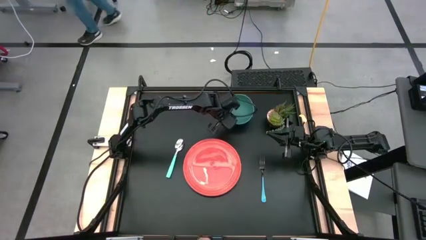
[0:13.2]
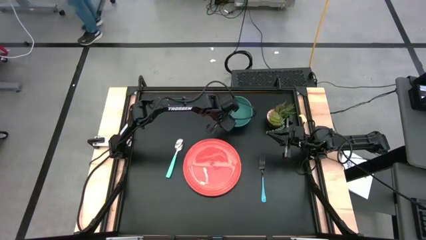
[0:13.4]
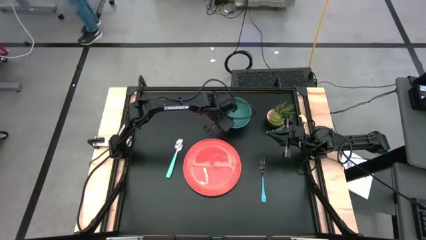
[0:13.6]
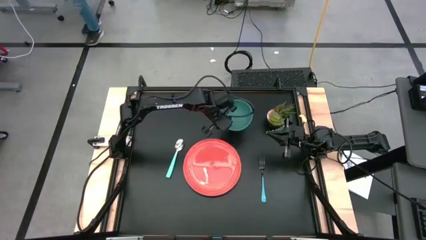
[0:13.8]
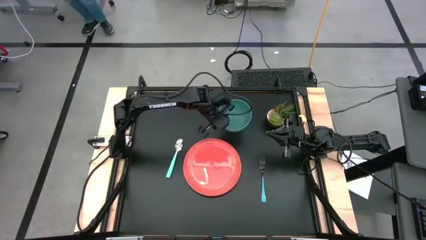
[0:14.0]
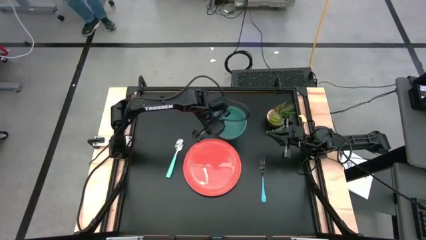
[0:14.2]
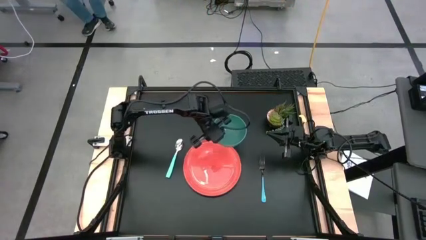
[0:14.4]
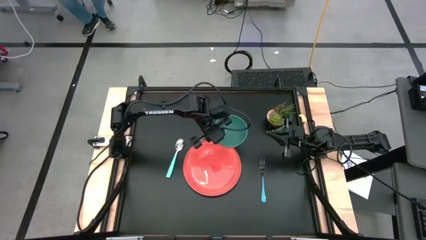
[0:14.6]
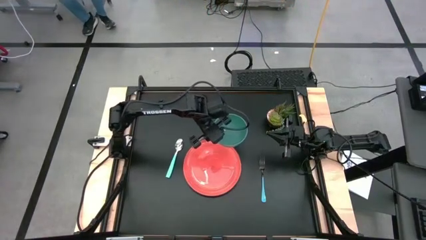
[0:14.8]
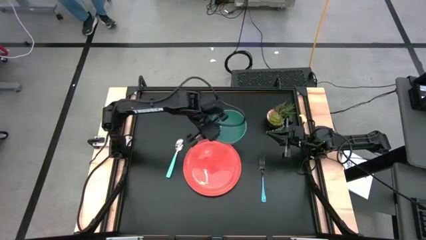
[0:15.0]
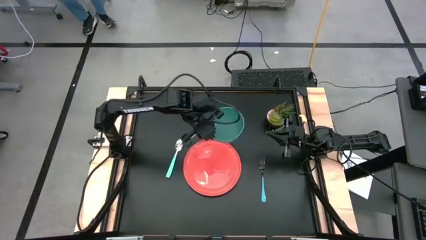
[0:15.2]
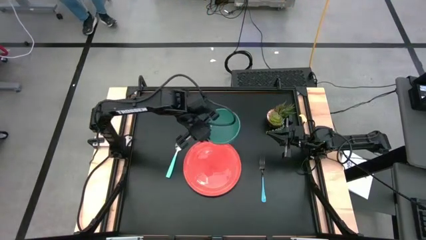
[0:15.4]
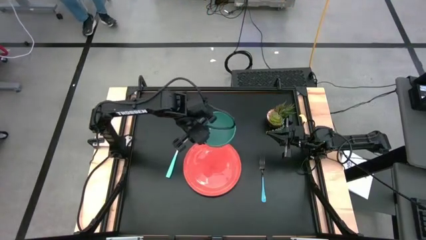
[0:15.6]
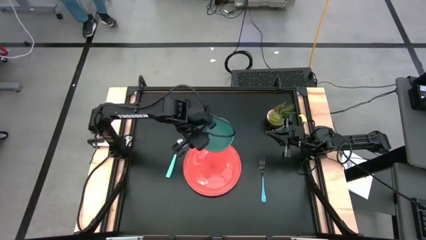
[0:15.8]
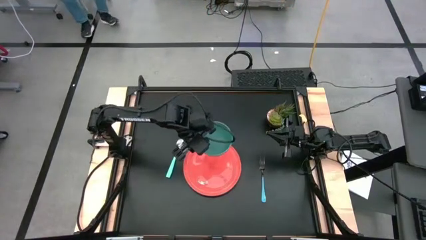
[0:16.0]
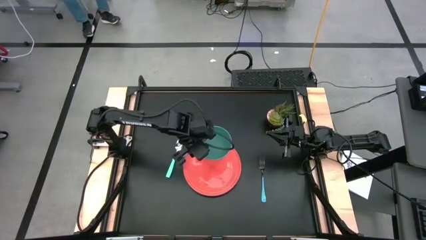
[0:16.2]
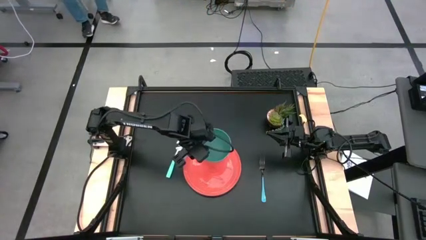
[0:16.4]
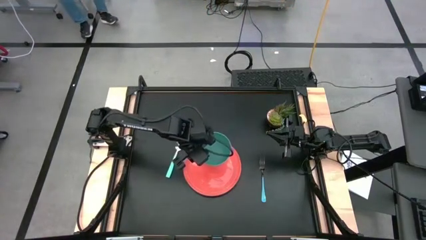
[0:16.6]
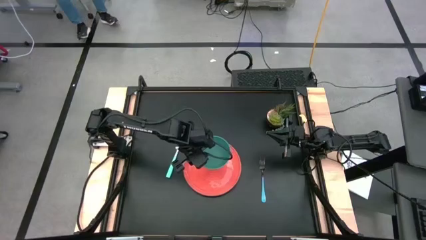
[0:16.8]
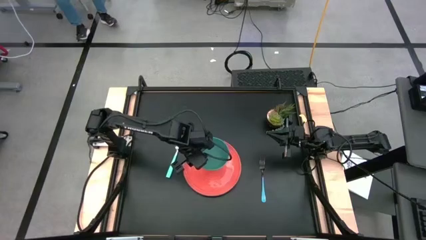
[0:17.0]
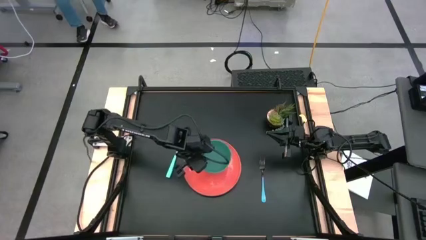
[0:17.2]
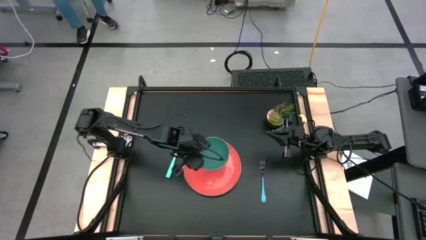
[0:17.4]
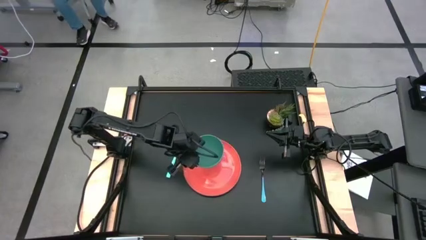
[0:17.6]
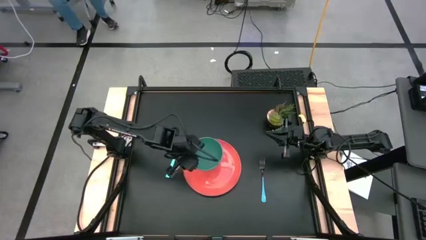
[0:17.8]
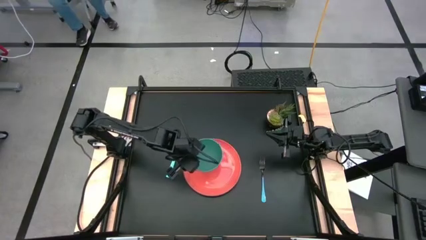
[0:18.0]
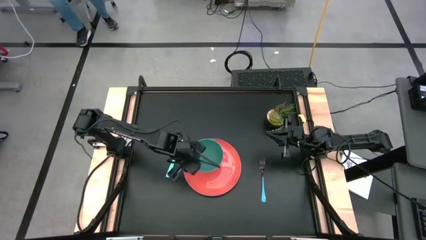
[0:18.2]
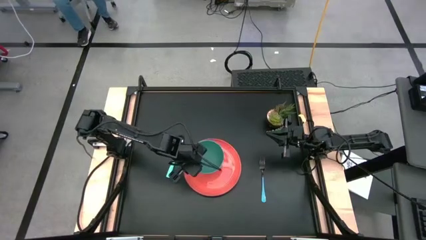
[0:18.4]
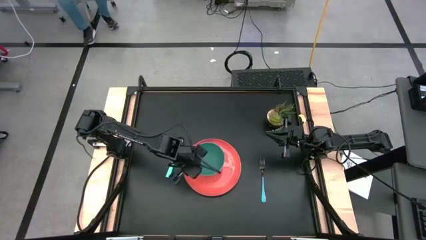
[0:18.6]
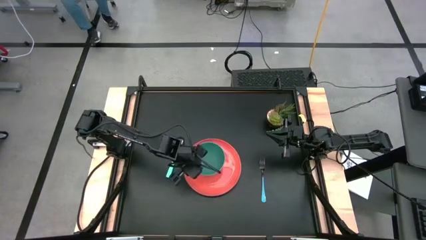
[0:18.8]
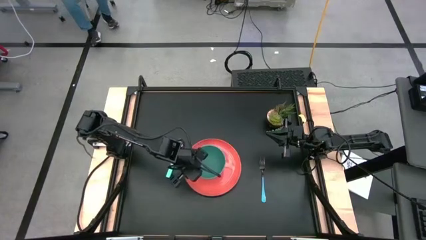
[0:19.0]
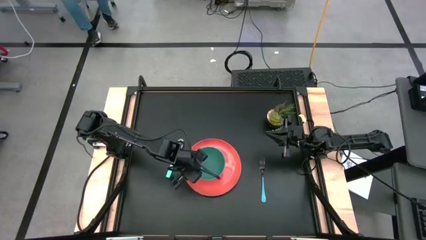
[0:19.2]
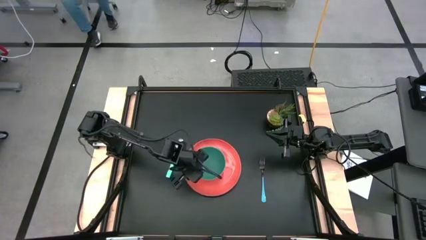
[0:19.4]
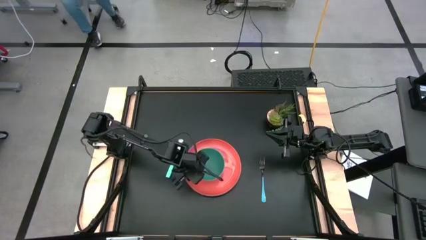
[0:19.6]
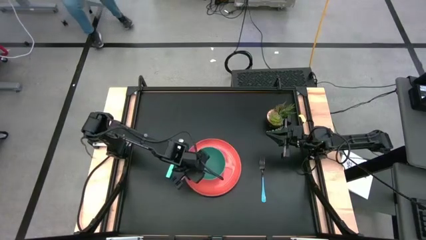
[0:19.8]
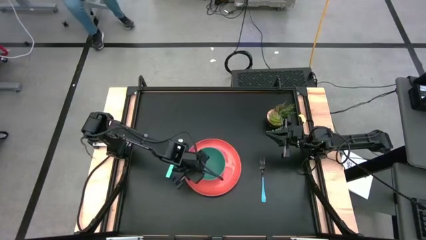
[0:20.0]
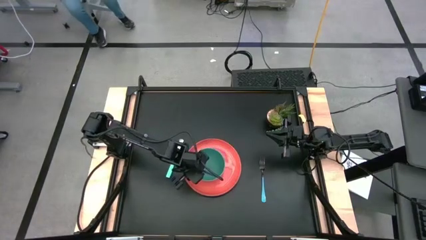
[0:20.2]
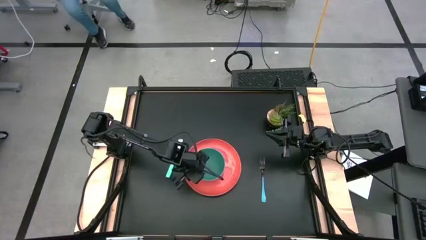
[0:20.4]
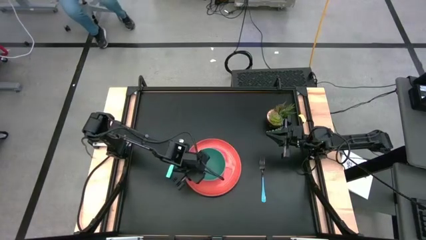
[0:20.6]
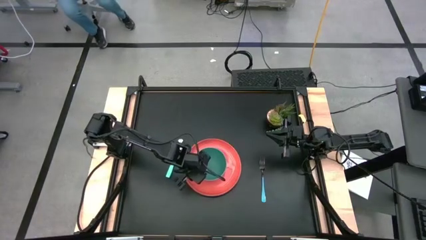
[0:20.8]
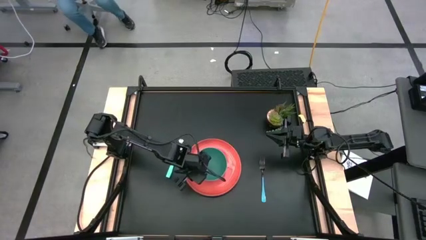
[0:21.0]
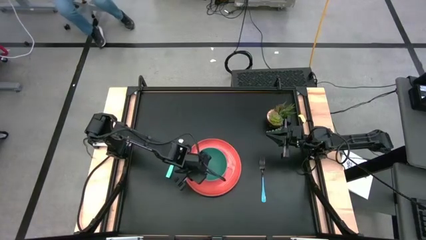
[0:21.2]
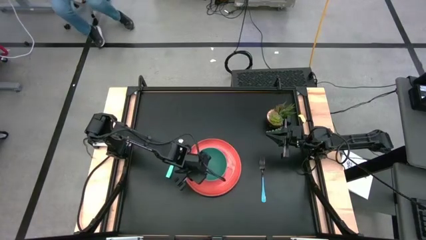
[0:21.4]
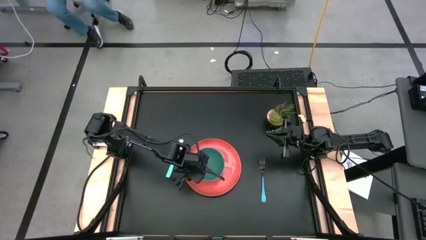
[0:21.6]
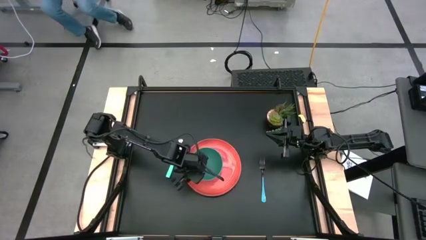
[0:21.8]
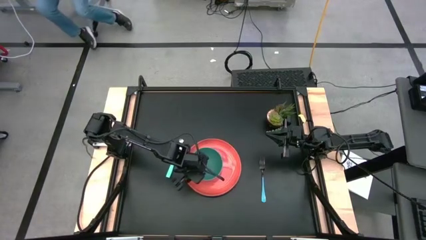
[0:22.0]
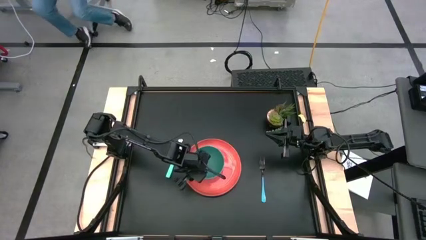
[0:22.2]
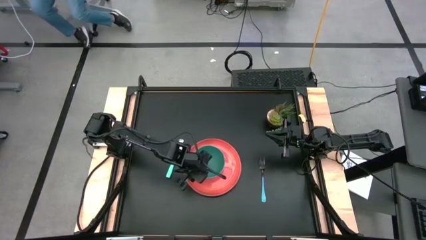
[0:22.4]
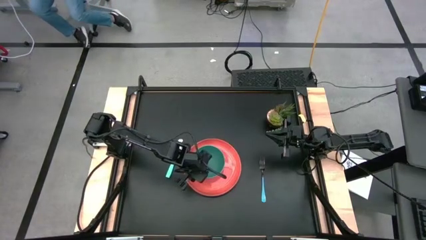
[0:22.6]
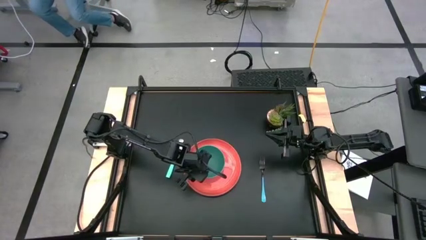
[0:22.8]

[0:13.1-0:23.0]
Task: Set table place
Put the green bowl on top of the orange plate

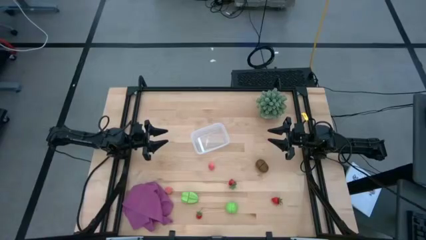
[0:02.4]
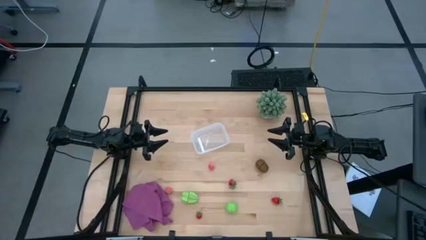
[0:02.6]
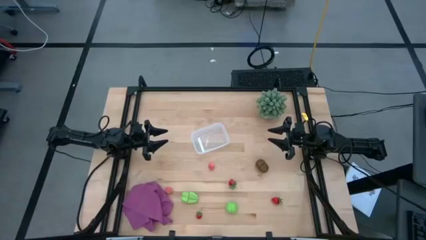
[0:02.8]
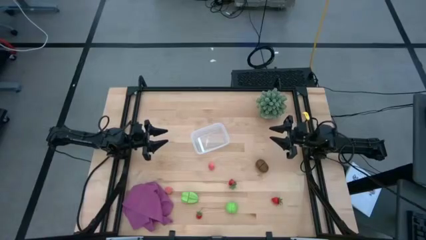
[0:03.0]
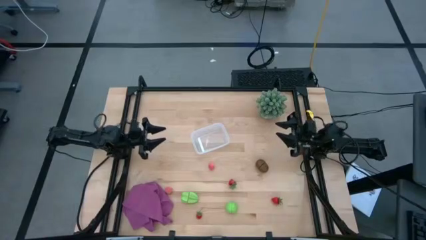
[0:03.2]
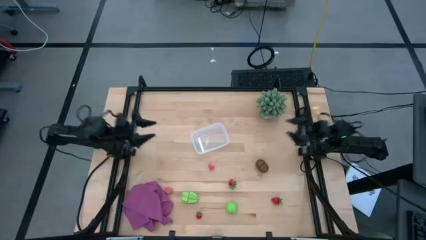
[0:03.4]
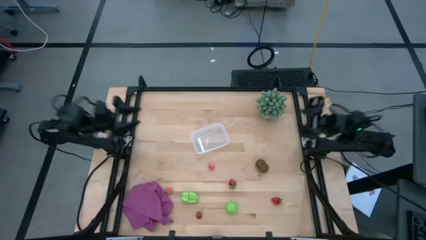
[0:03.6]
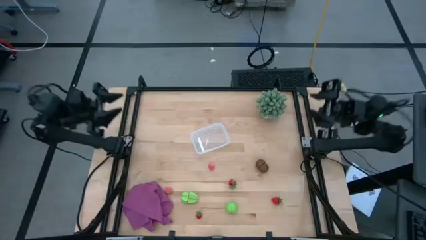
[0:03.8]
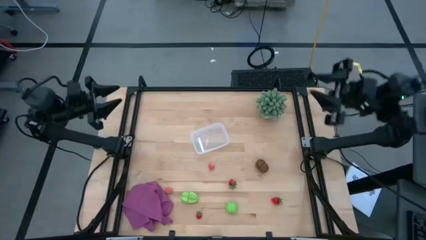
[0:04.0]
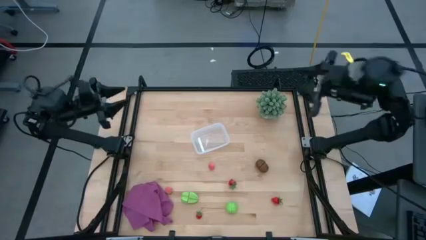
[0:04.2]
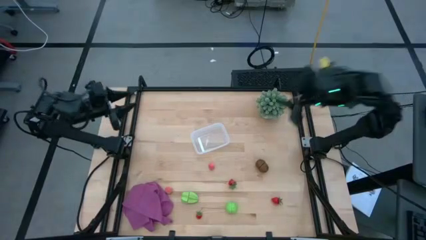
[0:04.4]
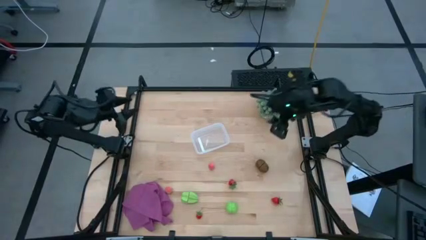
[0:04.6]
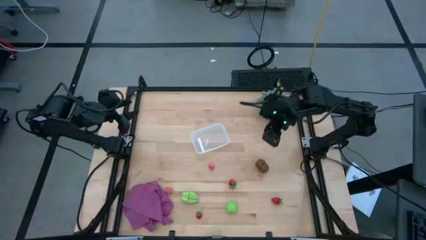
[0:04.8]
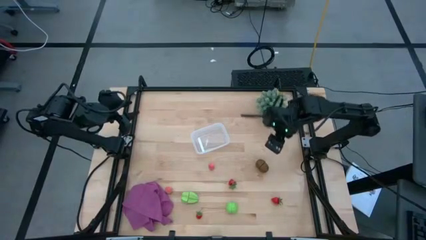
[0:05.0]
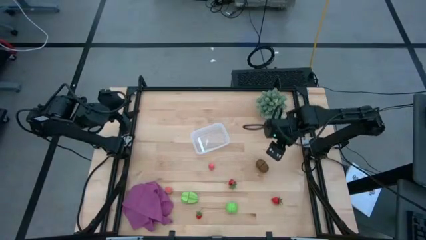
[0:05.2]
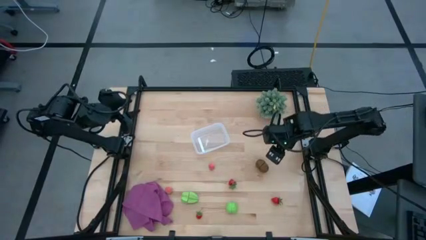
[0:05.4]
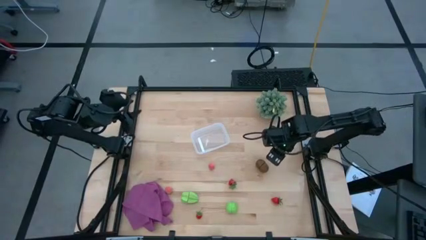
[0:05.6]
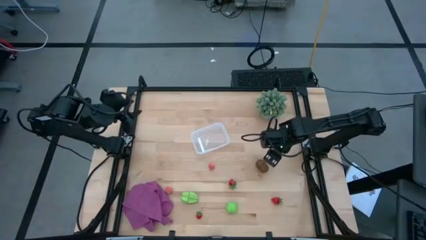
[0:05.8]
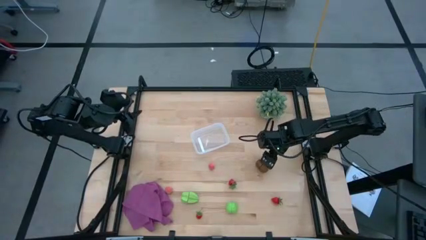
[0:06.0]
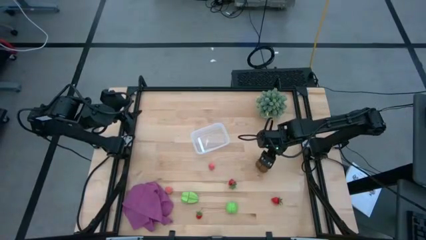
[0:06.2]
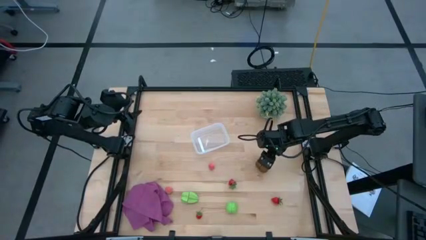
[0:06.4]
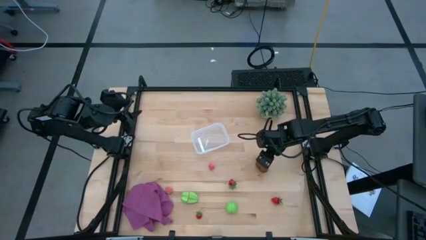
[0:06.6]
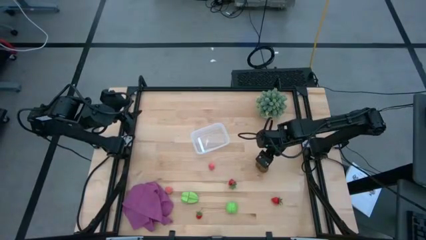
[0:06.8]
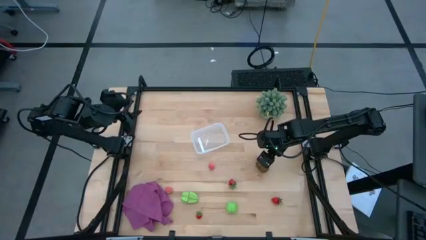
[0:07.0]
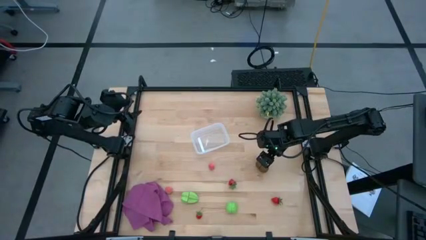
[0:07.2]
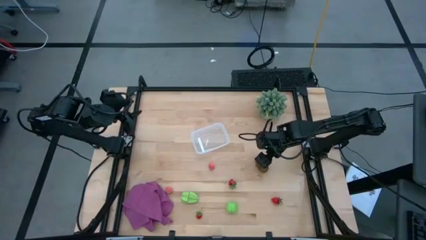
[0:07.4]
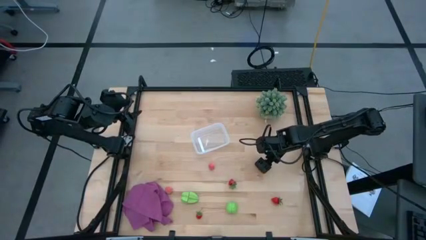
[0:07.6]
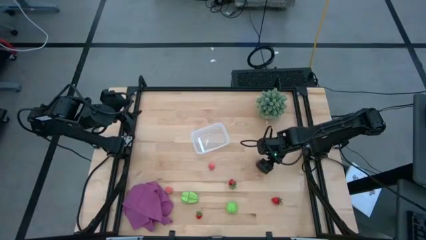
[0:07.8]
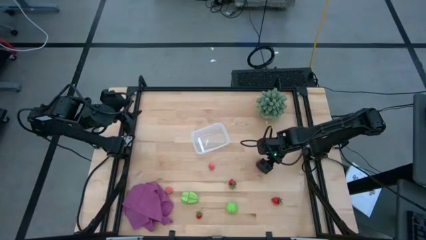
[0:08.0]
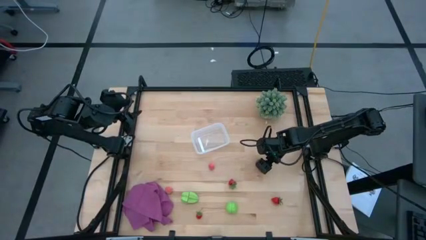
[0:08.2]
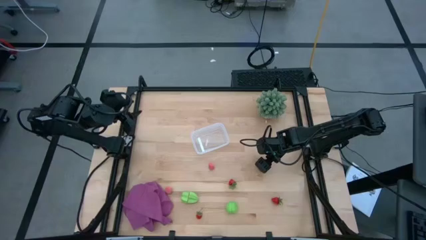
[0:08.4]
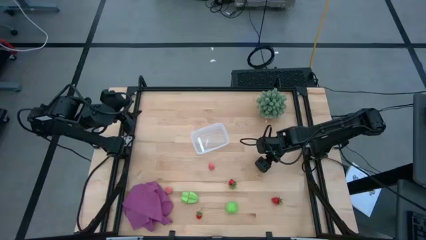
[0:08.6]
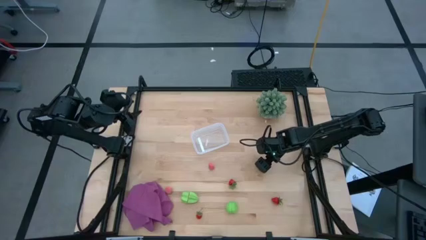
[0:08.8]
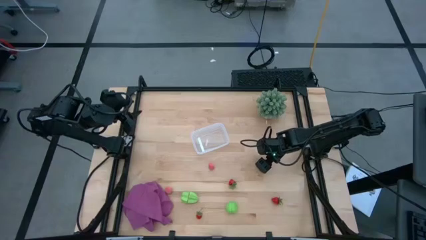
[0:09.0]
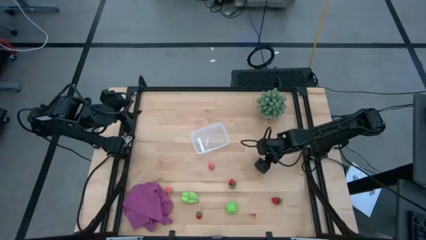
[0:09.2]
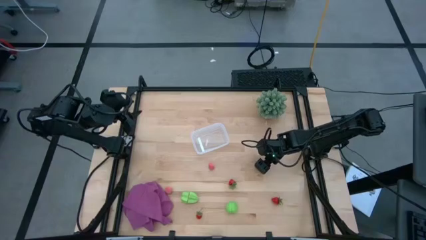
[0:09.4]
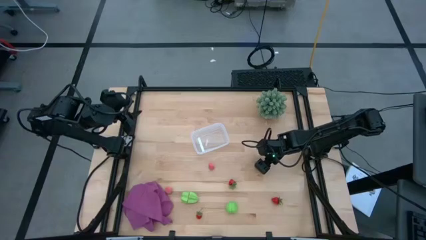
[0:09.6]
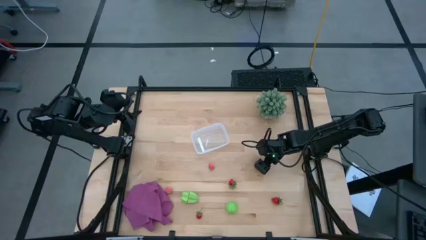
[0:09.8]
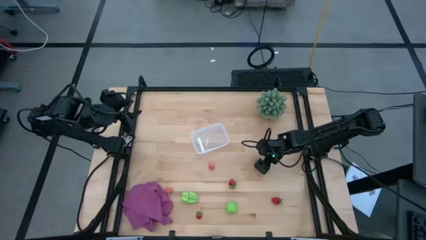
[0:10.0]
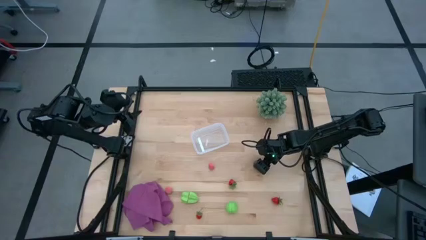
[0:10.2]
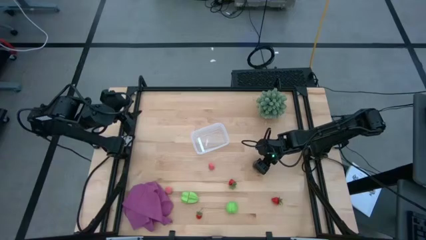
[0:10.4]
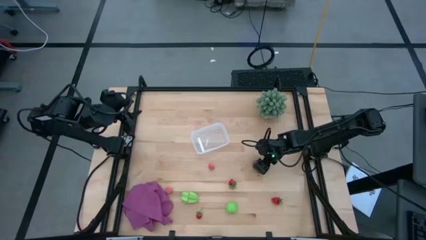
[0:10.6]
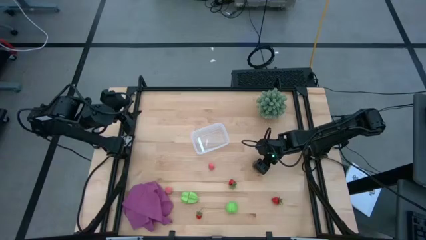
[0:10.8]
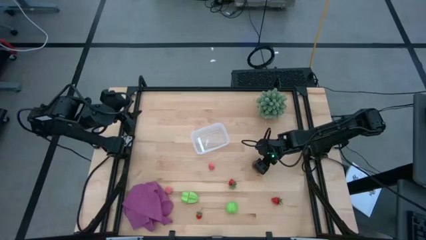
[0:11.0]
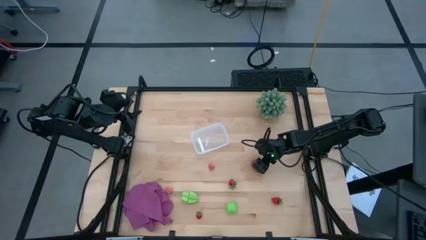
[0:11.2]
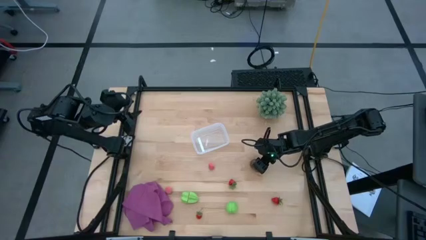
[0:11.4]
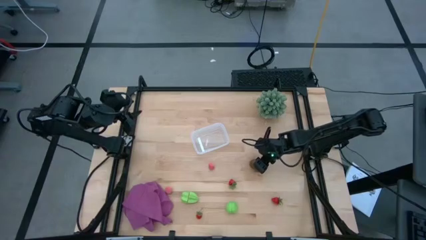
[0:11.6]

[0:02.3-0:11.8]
Task: Pick and placing Produce into tupperware
Put the brown kiwi into the transparent container
